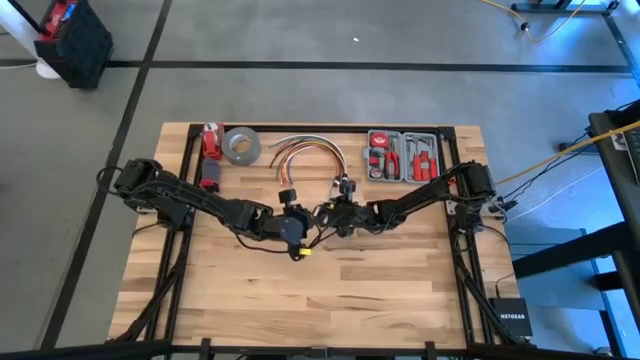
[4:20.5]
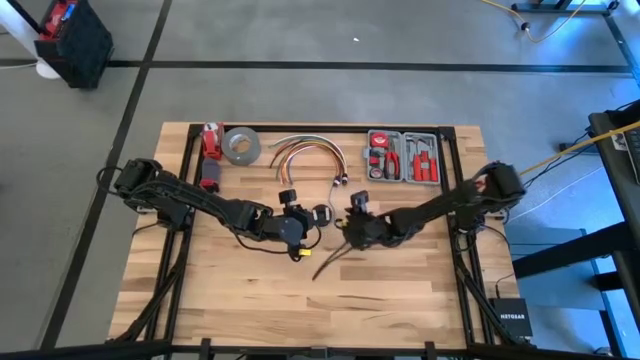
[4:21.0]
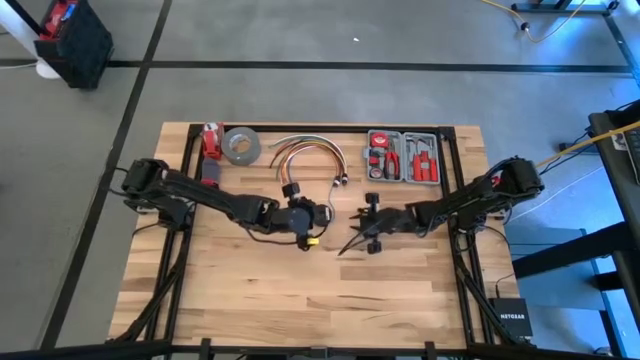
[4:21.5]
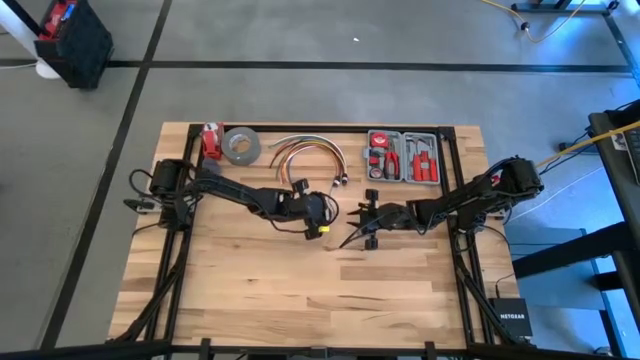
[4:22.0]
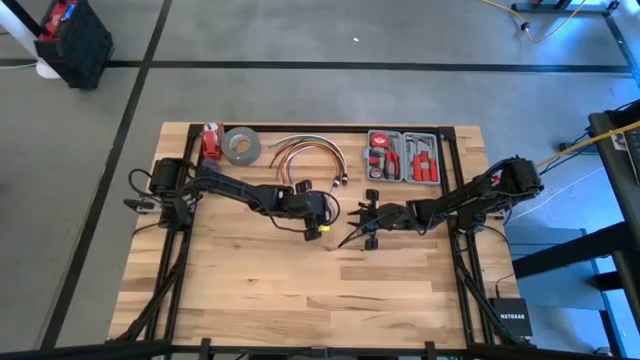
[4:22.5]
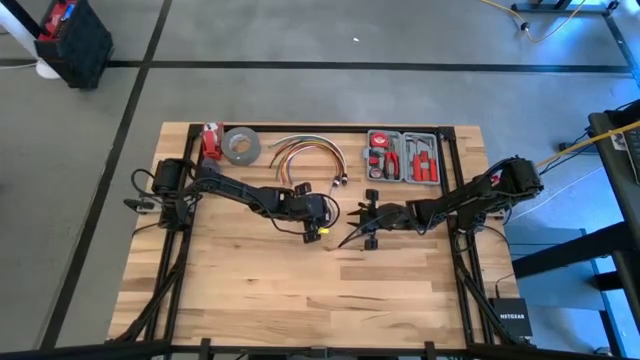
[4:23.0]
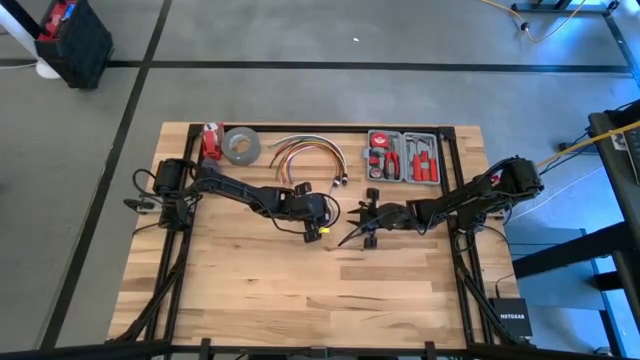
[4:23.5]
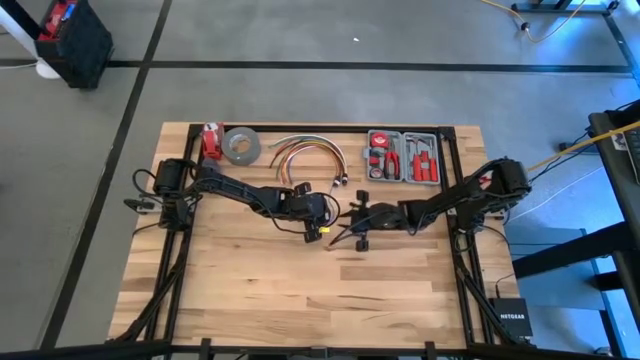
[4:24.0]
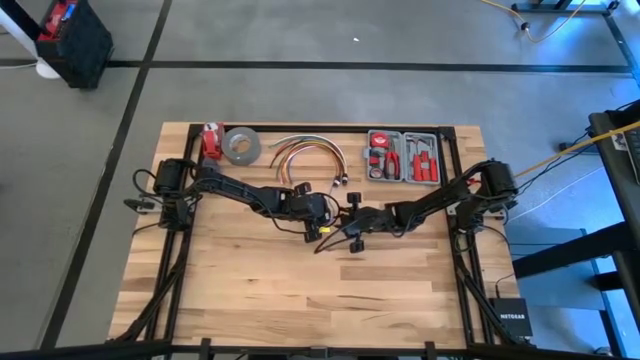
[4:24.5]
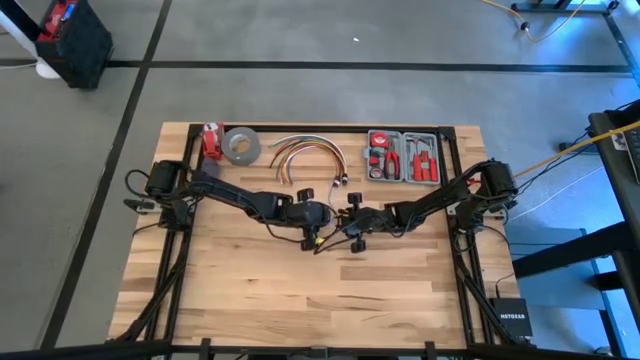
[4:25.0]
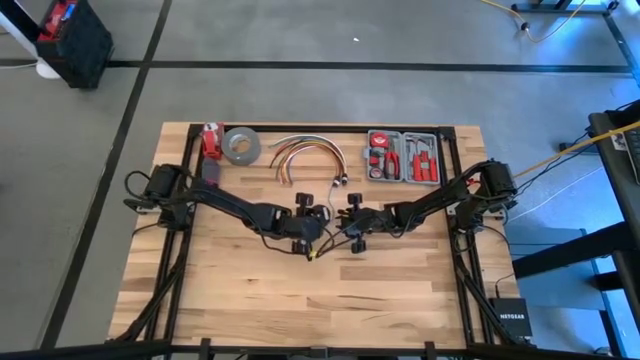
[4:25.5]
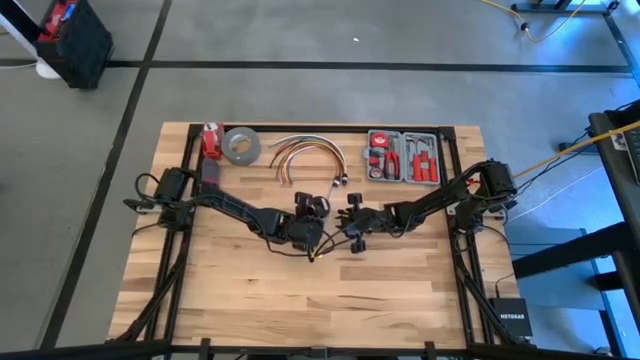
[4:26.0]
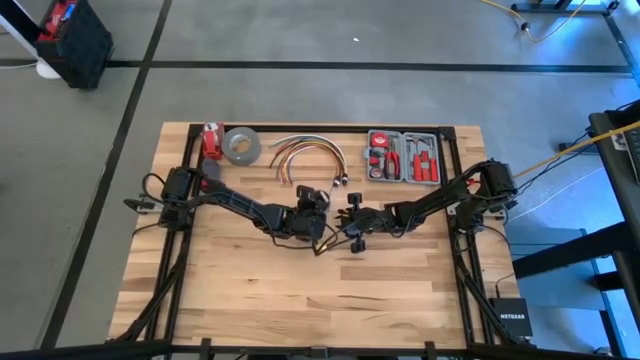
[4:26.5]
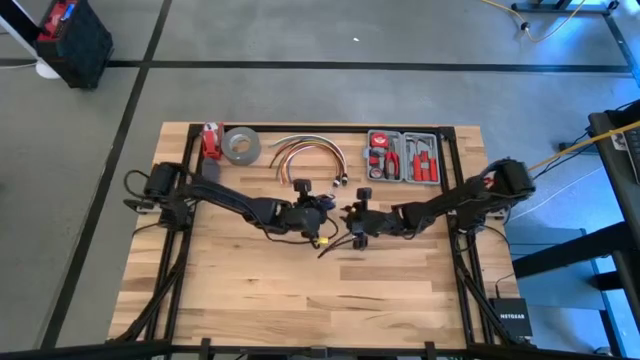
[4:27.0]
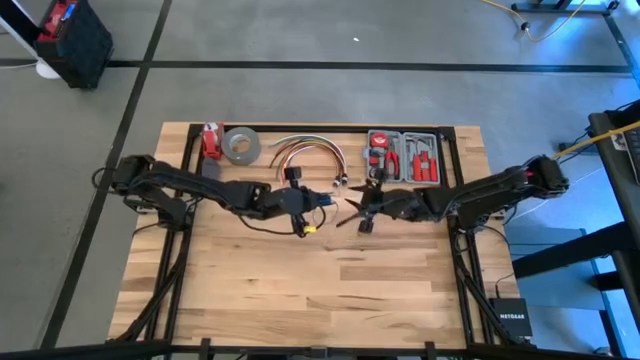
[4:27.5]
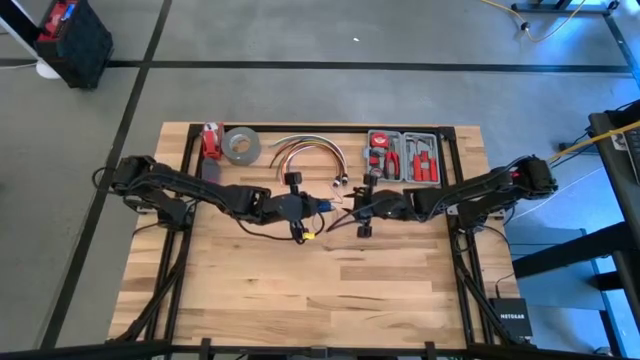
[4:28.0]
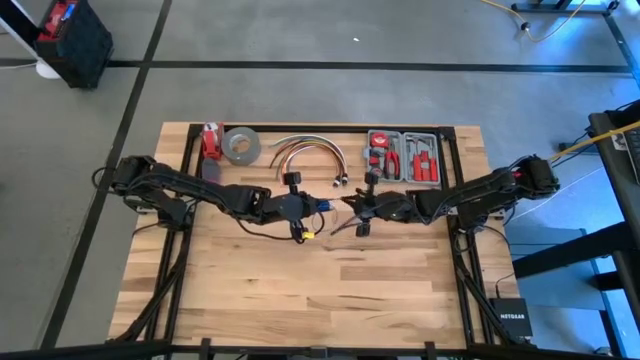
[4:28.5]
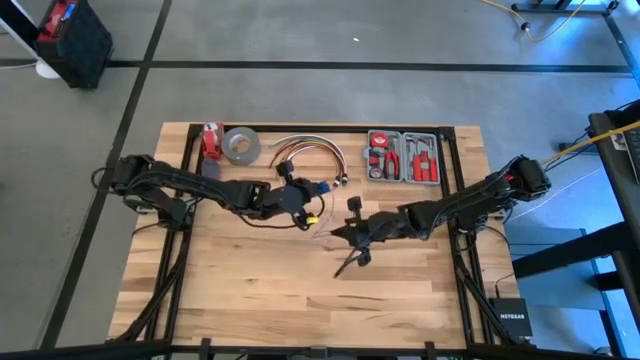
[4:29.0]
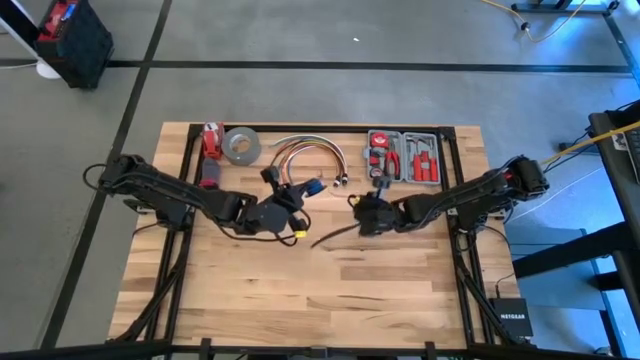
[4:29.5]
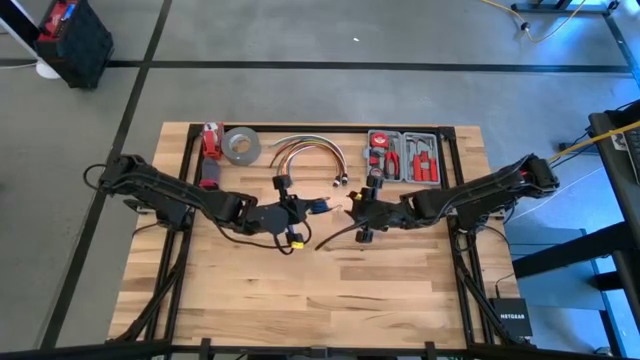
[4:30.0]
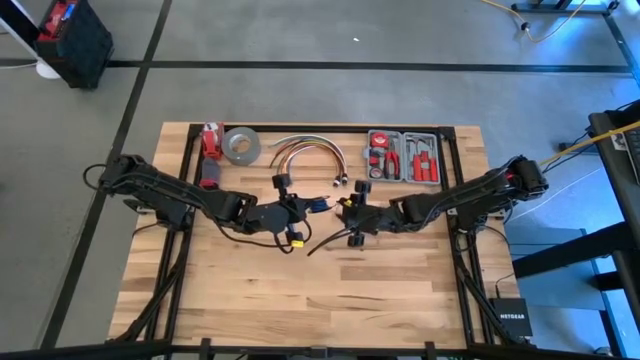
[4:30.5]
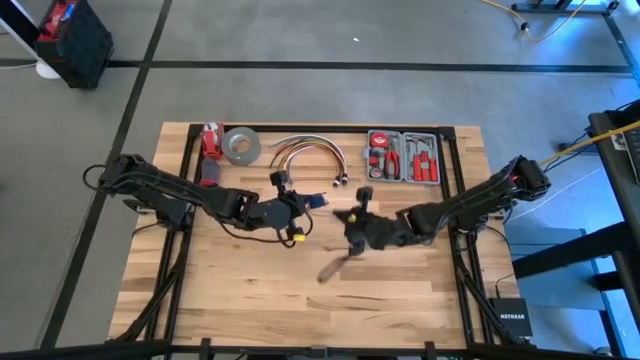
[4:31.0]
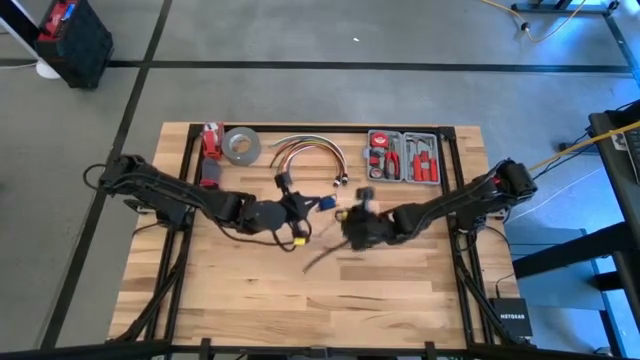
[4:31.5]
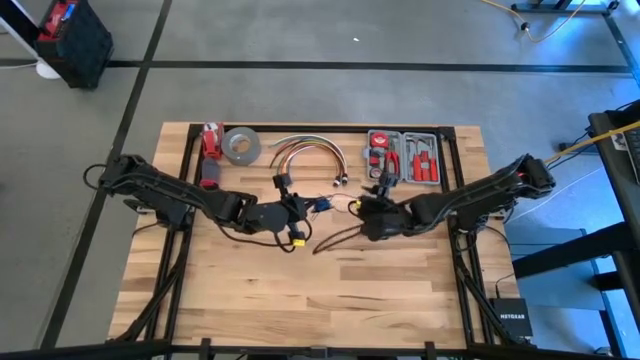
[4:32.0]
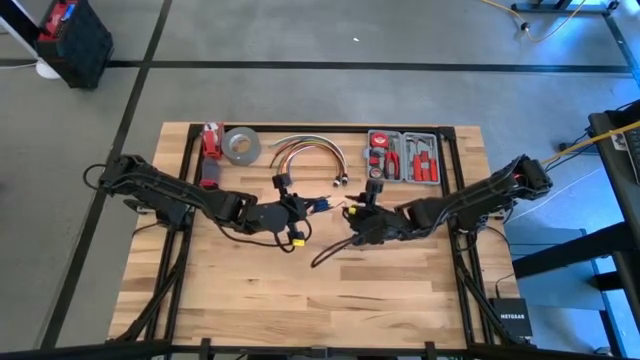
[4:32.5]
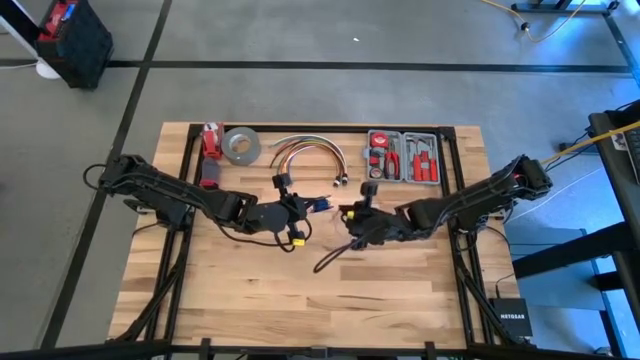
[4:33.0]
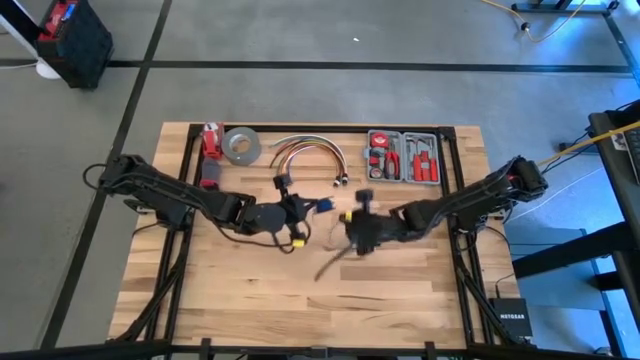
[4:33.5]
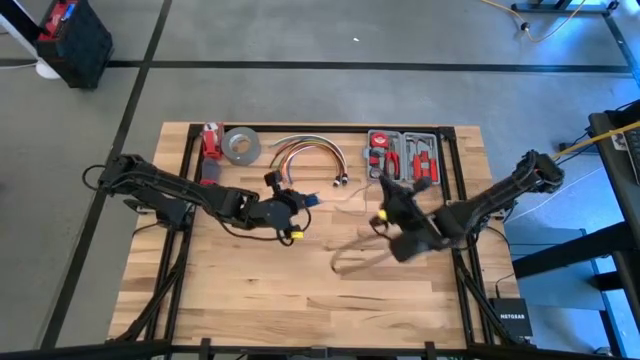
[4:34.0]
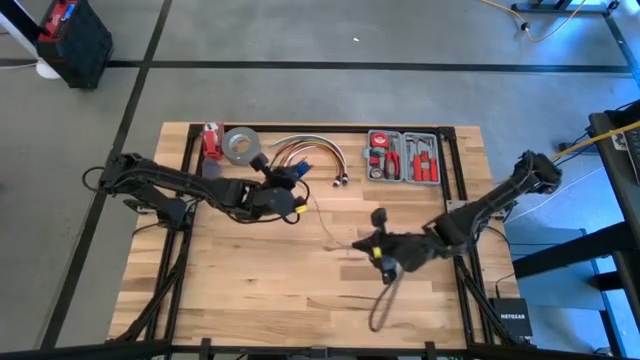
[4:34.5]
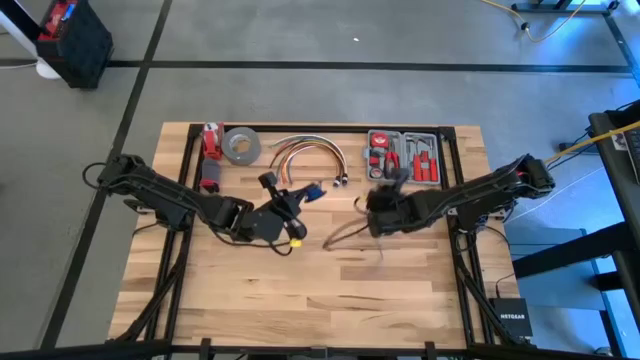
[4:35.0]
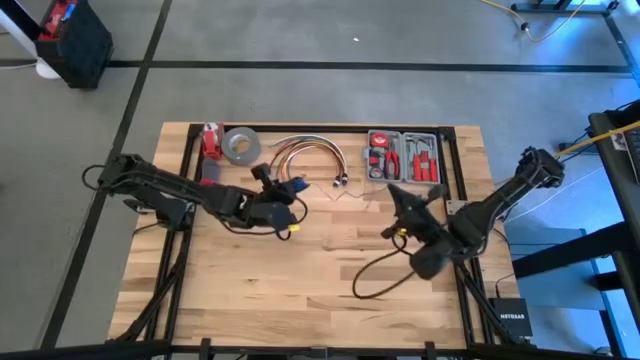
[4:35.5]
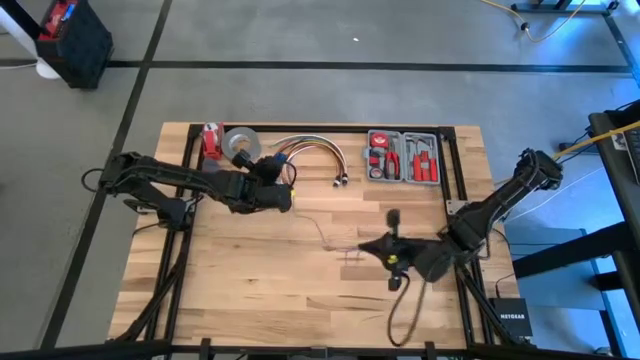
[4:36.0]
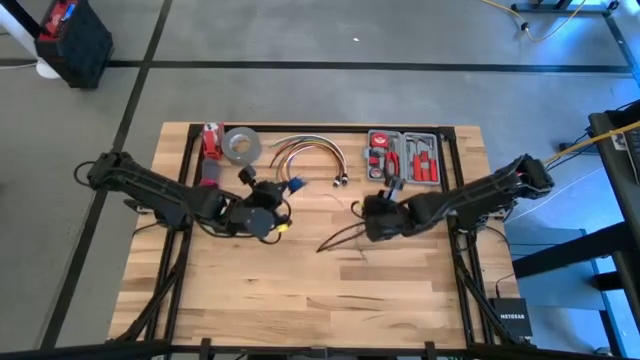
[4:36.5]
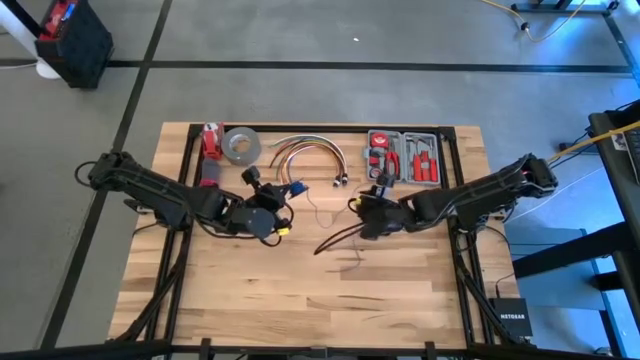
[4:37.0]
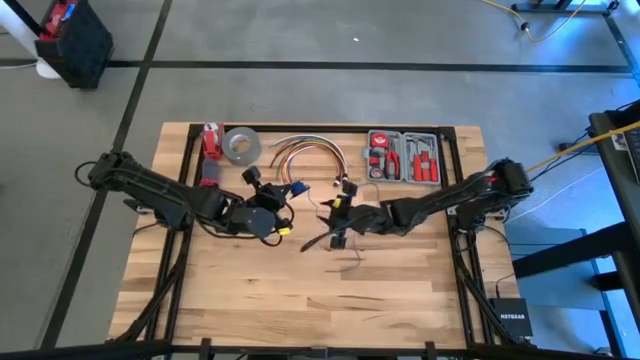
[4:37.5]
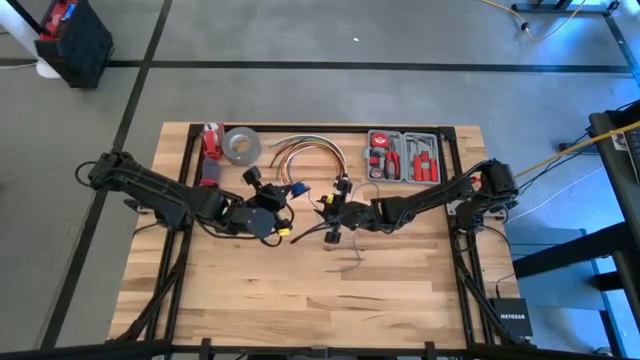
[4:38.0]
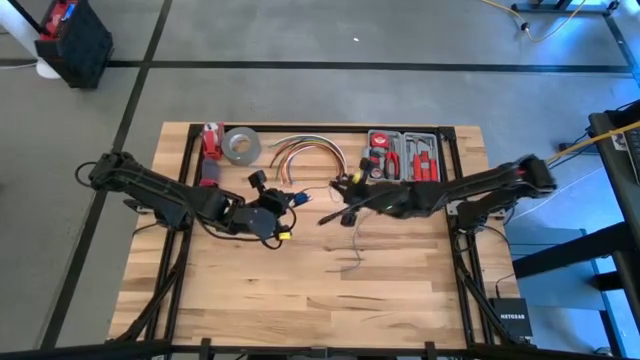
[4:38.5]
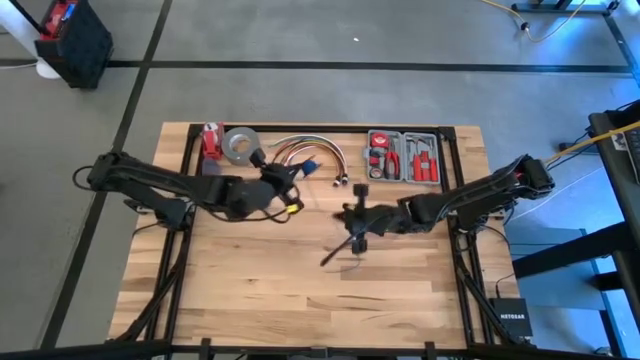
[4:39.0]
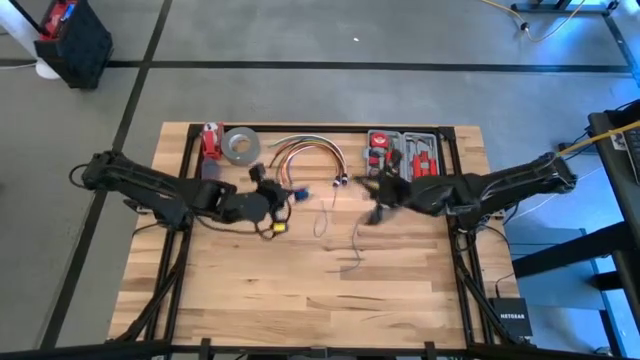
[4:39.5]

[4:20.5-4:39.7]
Task: Coil cords
Uncoil the blue wire from the black spool

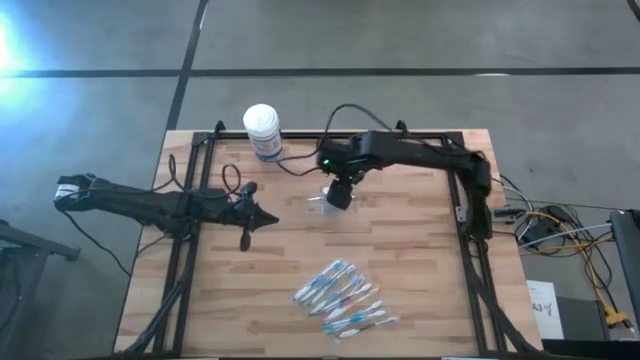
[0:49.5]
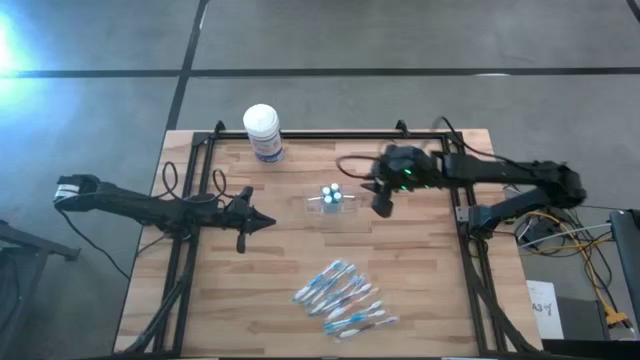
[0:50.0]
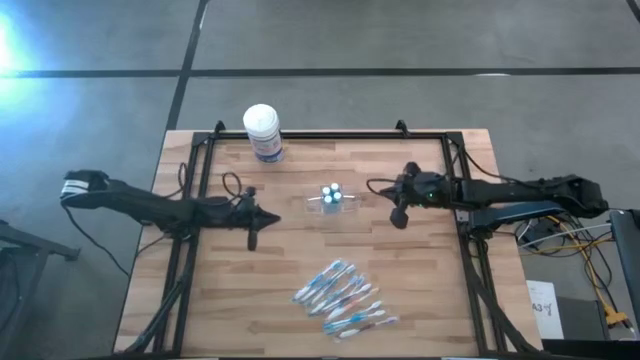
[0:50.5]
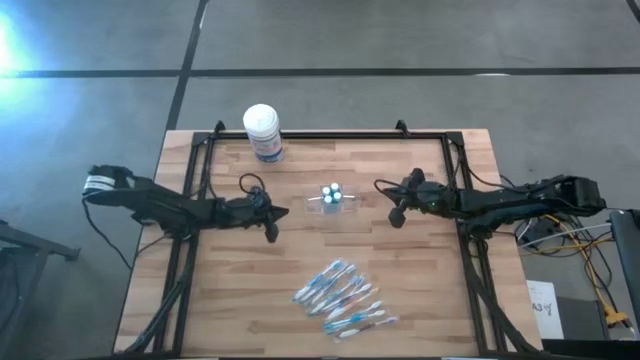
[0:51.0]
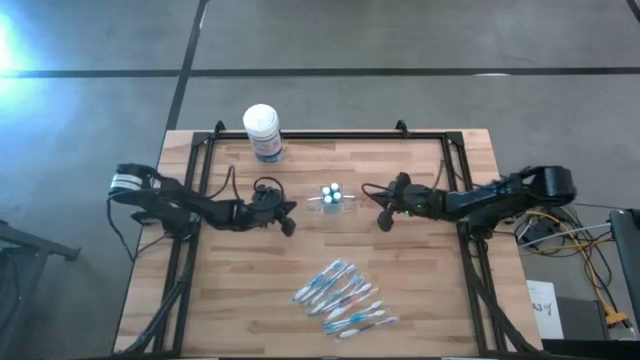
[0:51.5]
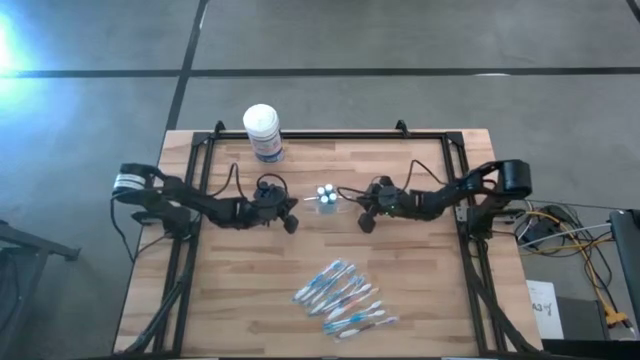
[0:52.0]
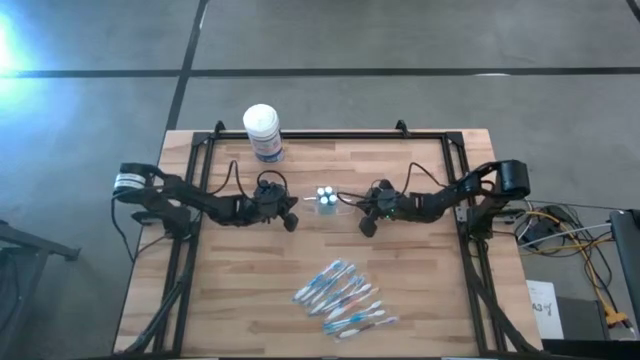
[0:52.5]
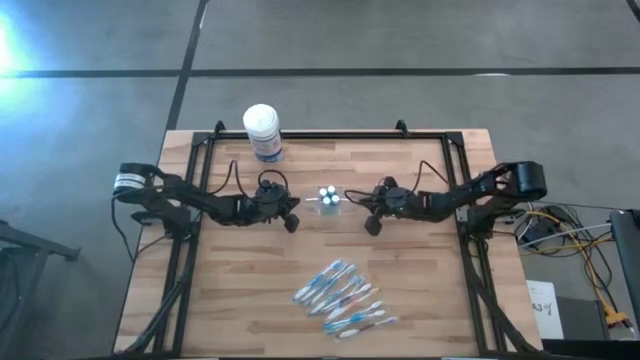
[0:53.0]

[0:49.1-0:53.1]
Task: Pick & Place toothbrushing station
Adjust the transparent organizer
